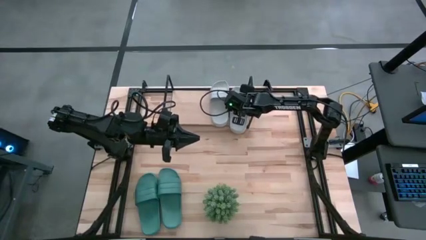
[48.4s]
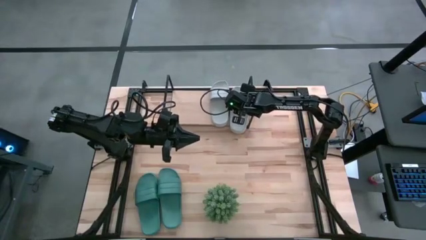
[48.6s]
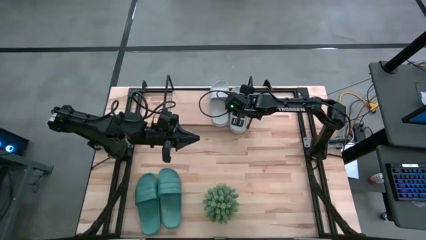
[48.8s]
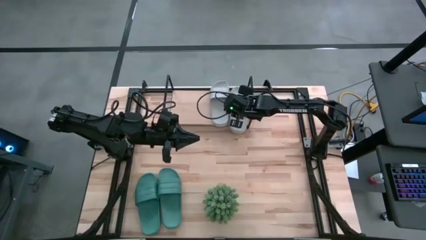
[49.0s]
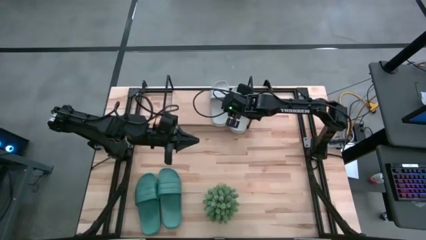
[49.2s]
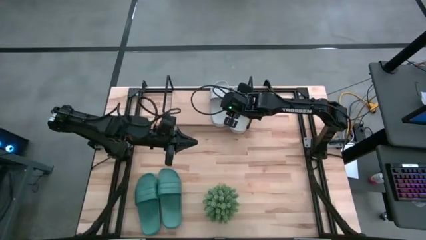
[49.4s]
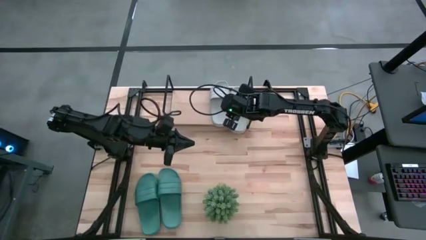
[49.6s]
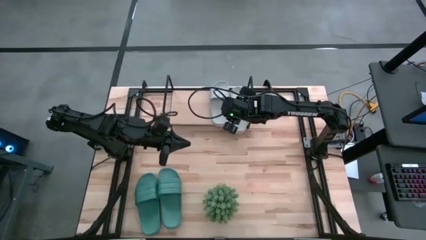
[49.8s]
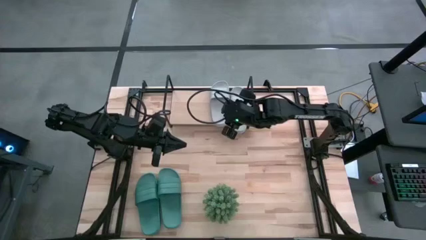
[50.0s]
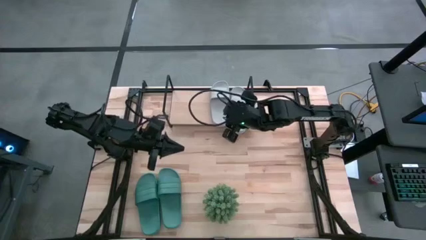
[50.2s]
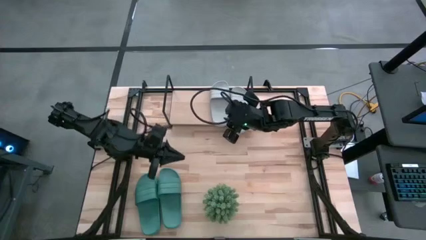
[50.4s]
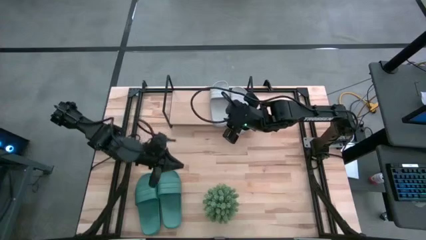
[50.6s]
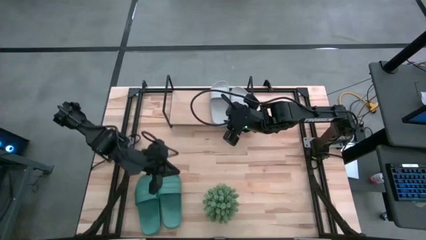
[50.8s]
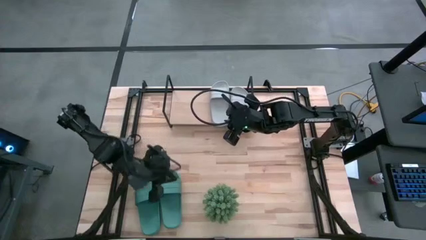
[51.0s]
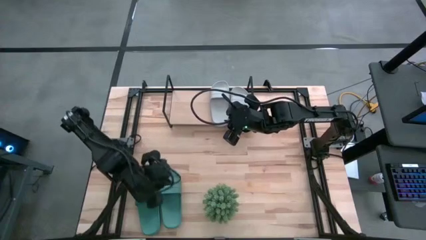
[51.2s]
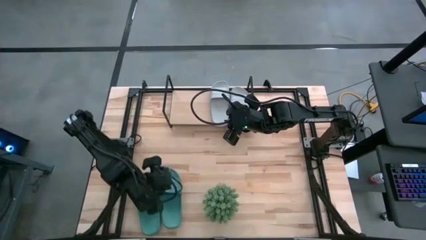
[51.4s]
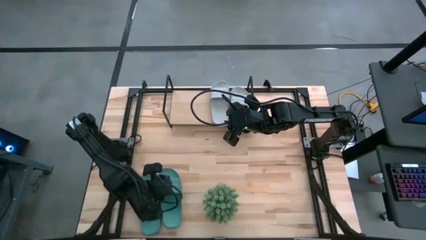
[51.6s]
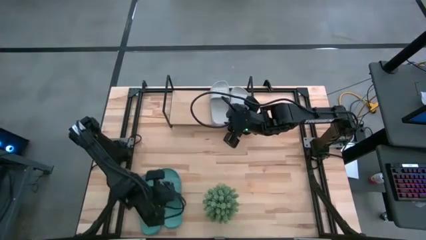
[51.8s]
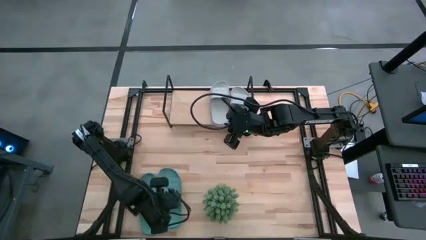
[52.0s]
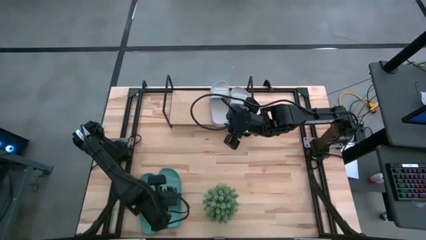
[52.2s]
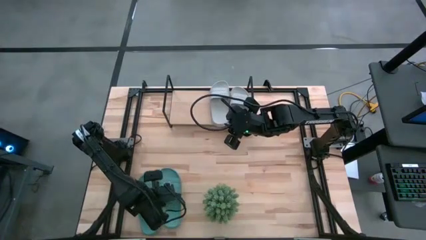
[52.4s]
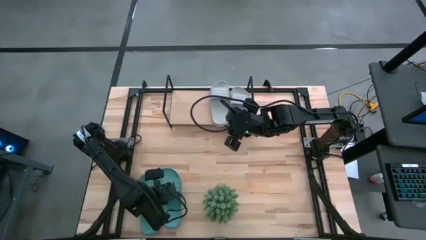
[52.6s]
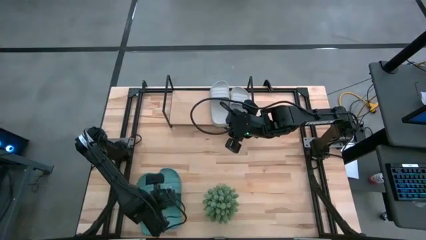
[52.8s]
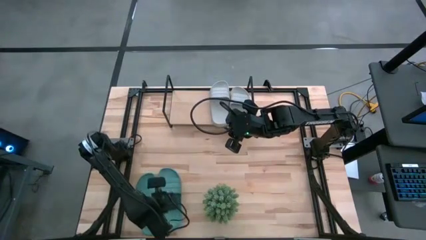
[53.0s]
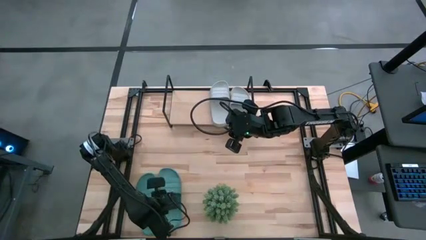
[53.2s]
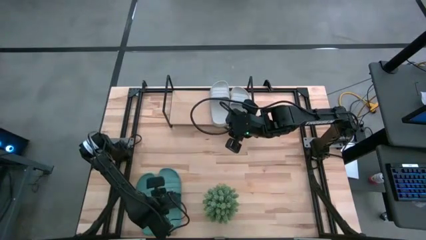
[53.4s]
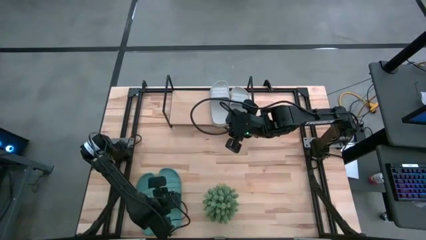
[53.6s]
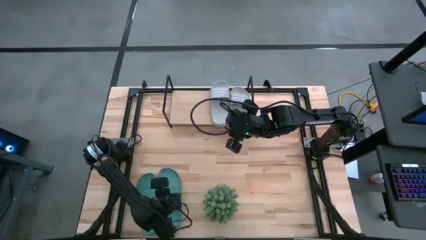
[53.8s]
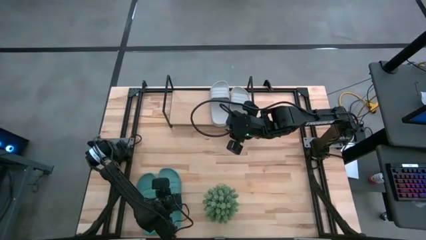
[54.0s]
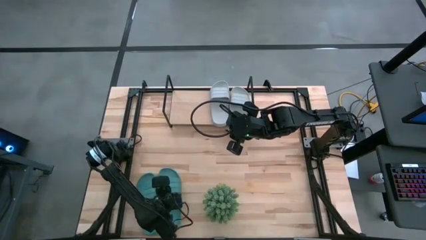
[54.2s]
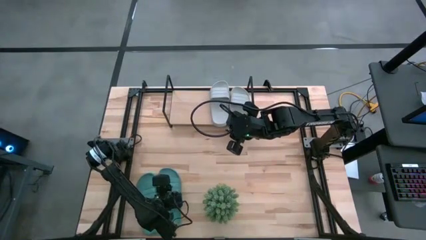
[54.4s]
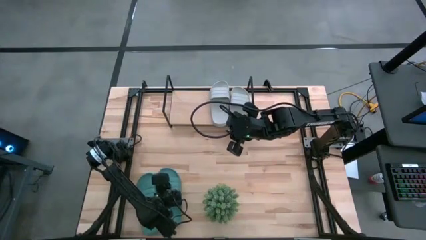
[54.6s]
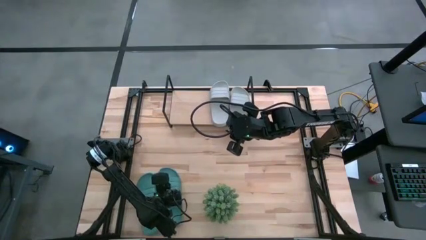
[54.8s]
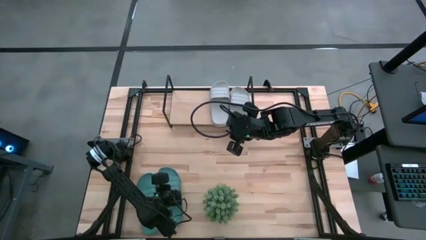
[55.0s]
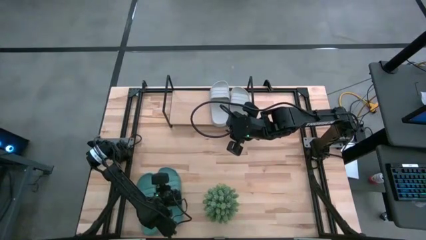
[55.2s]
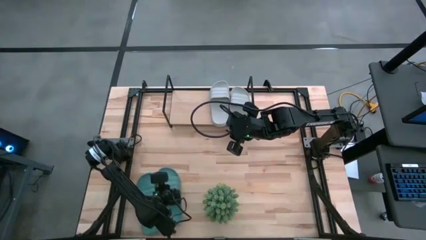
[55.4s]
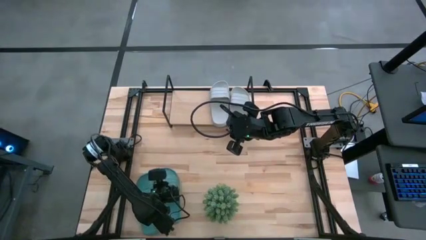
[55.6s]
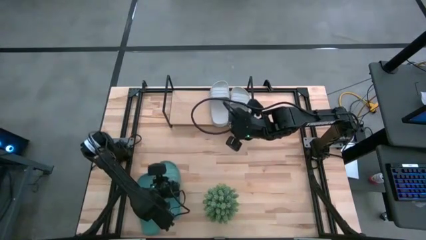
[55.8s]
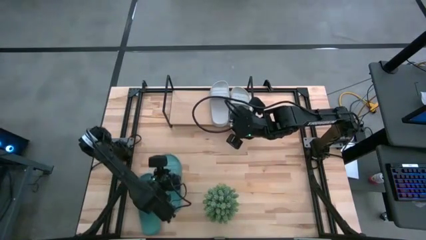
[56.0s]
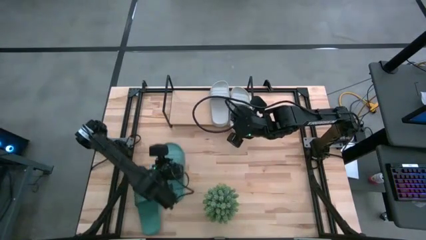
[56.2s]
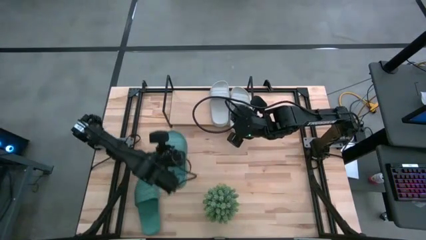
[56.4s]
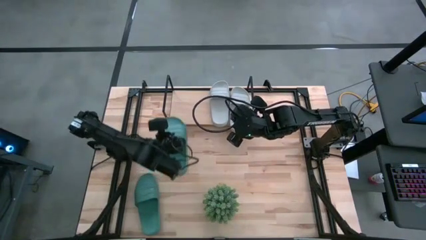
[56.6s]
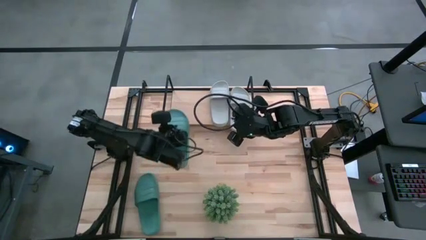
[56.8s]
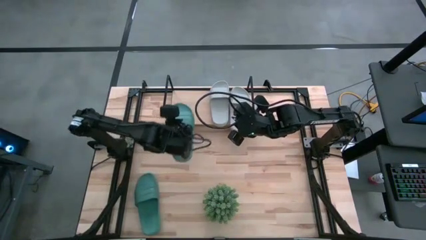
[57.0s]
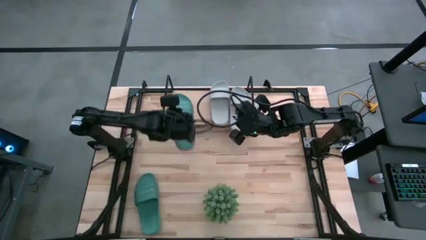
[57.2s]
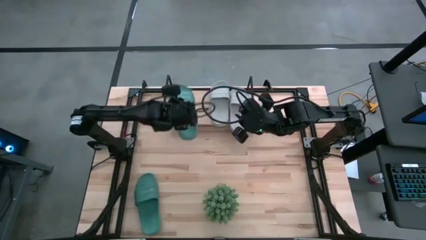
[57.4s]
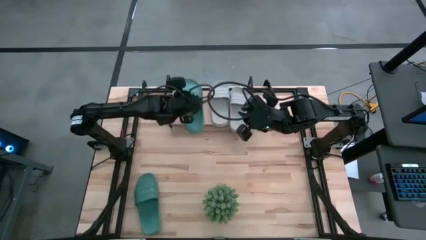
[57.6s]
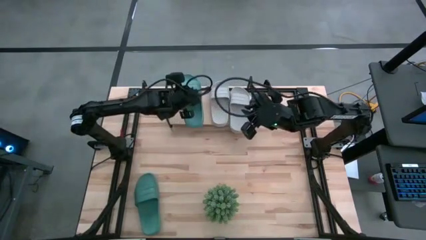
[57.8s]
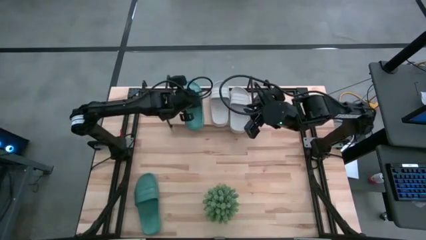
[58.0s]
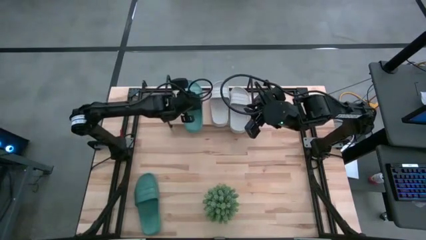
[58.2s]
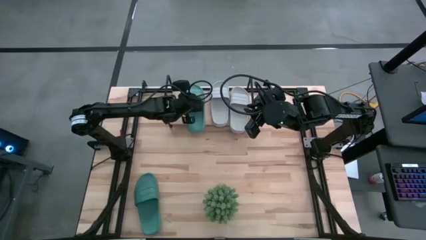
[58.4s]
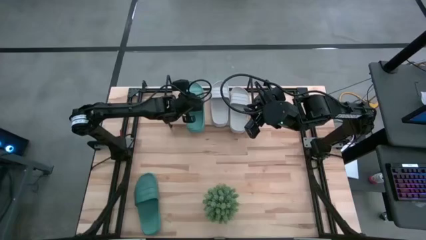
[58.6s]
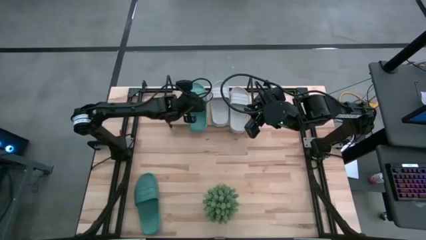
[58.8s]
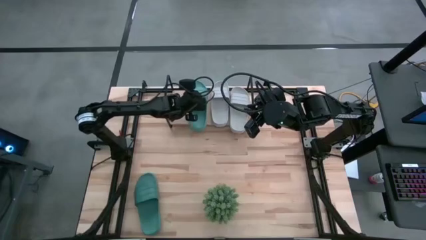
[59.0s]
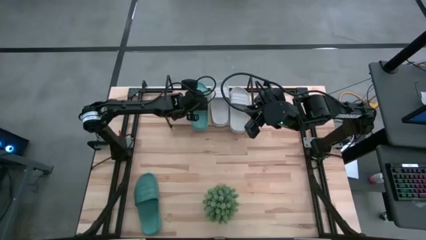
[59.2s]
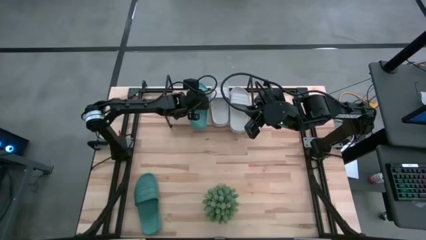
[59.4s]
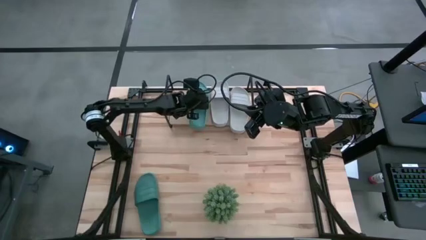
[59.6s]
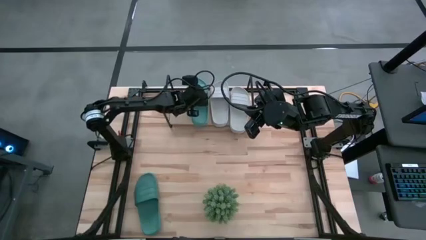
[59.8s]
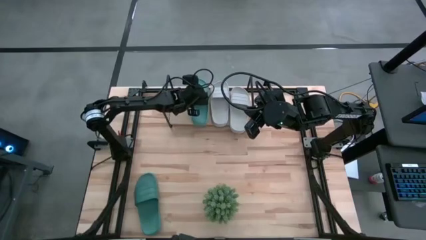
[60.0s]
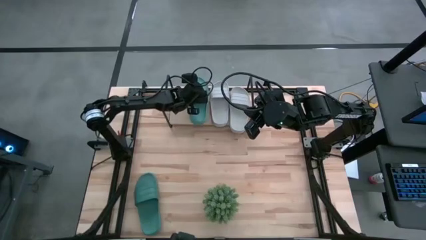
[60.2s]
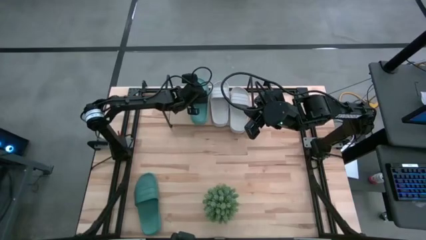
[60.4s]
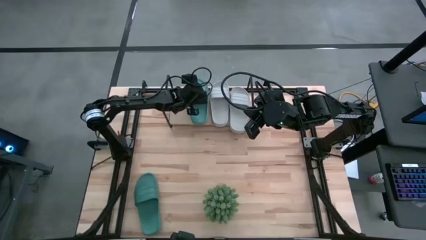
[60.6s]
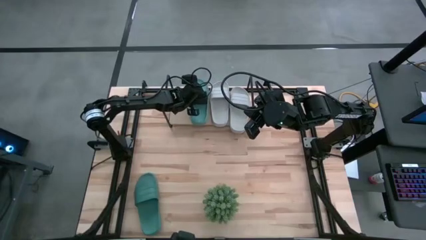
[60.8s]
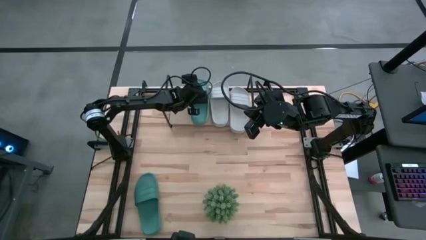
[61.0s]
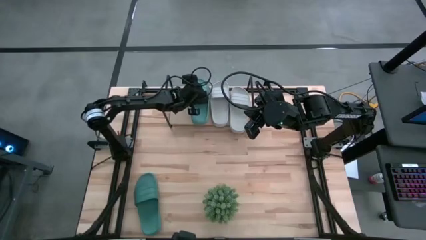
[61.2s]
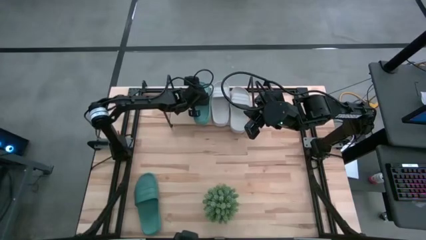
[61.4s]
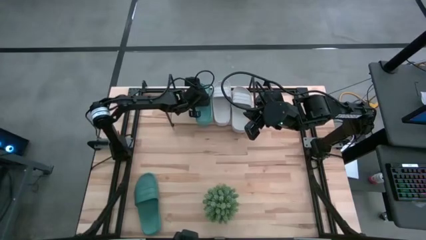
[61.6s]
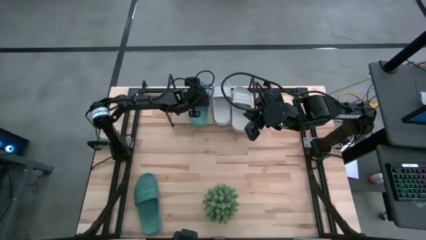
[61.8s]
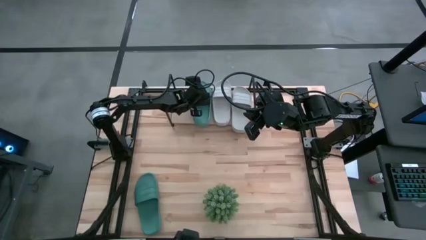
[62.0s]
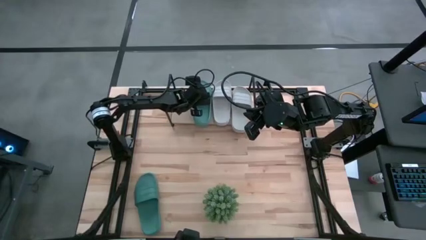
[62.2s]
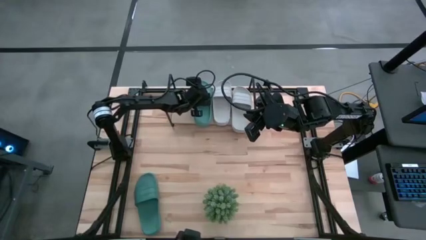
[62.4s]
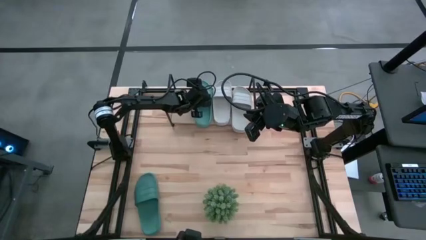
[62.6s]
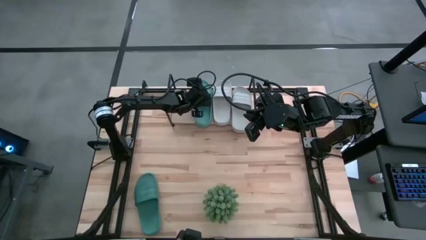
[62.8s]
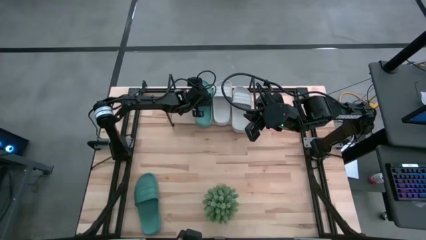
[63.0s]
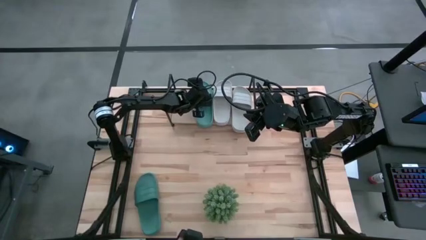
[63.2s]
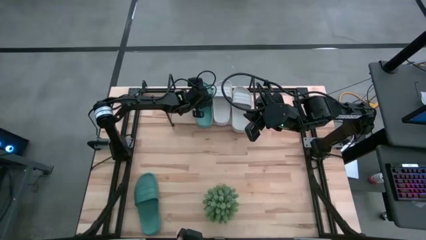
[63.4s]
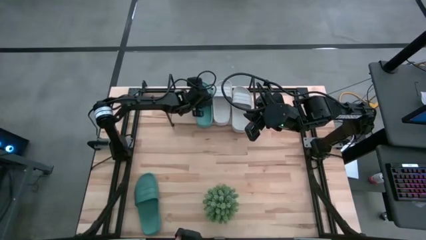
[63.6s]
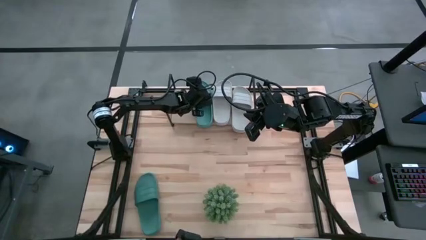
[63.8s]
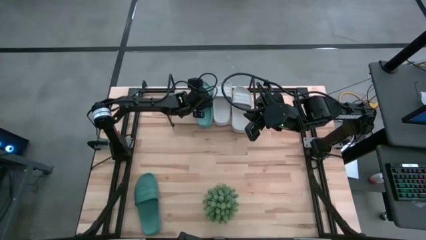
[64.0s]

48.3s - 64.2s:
Task: Pick and place slides into the shelf
Put the right green slipper on the shelf
